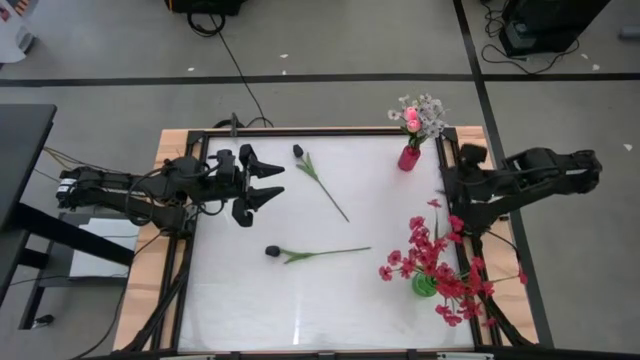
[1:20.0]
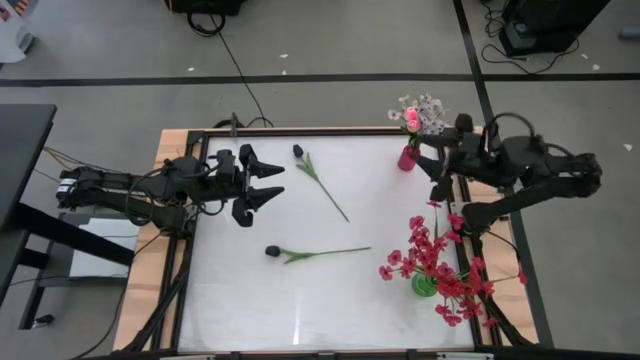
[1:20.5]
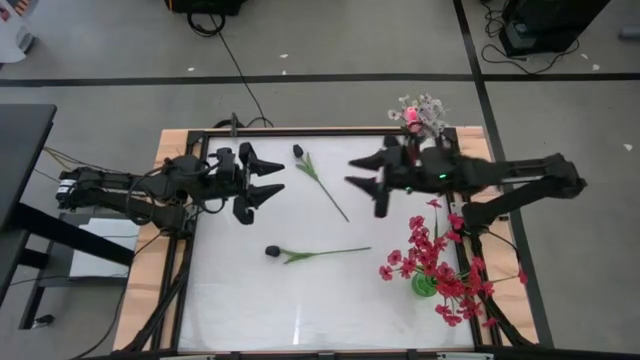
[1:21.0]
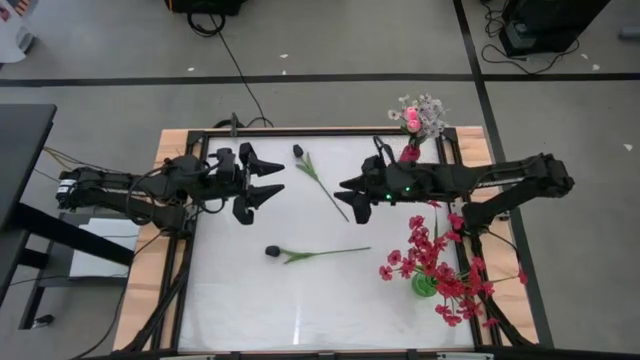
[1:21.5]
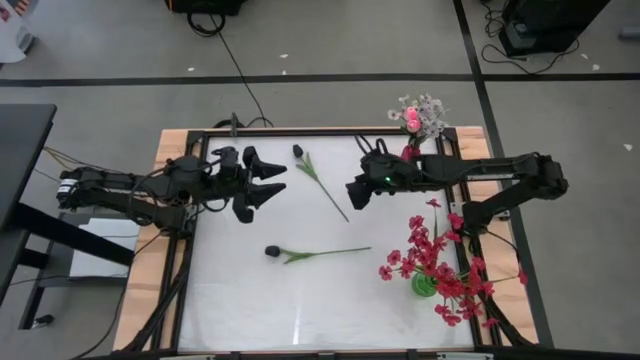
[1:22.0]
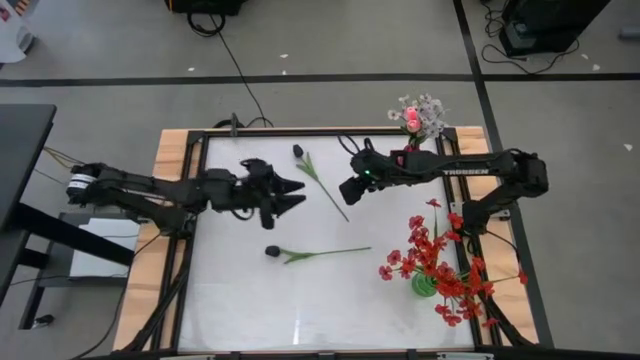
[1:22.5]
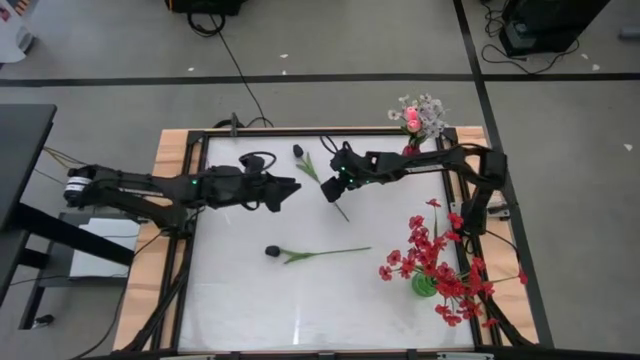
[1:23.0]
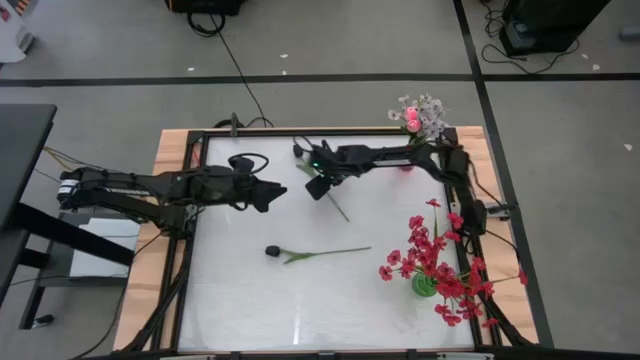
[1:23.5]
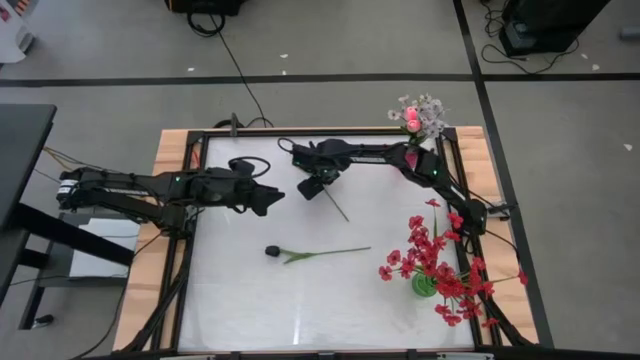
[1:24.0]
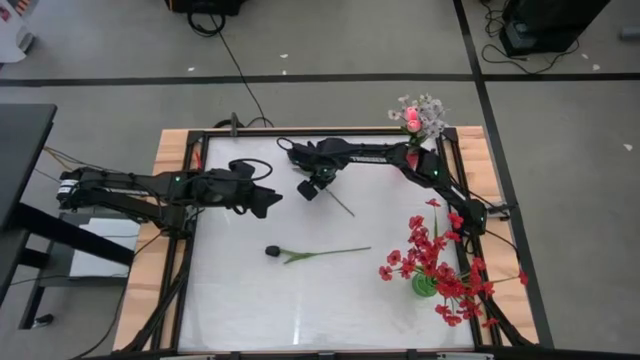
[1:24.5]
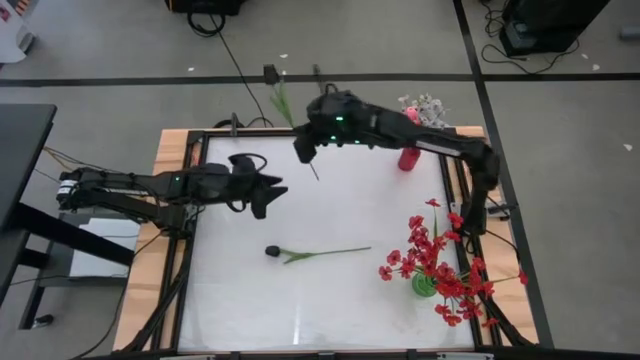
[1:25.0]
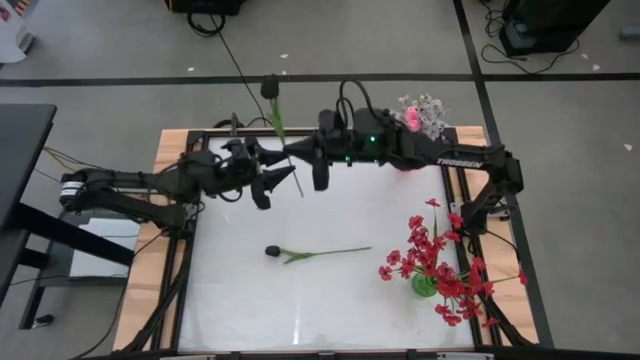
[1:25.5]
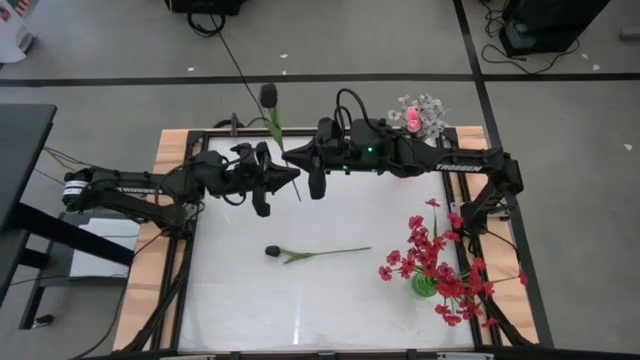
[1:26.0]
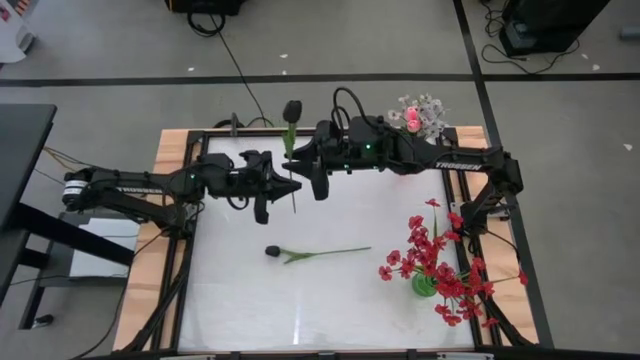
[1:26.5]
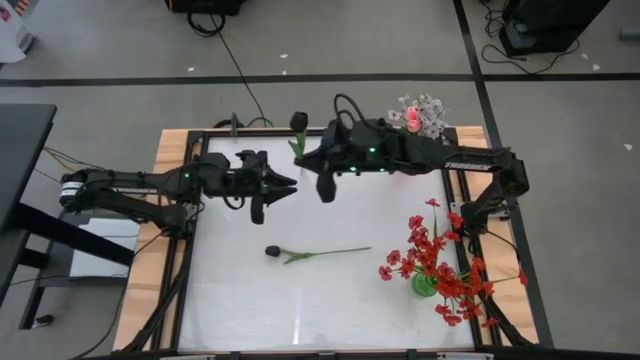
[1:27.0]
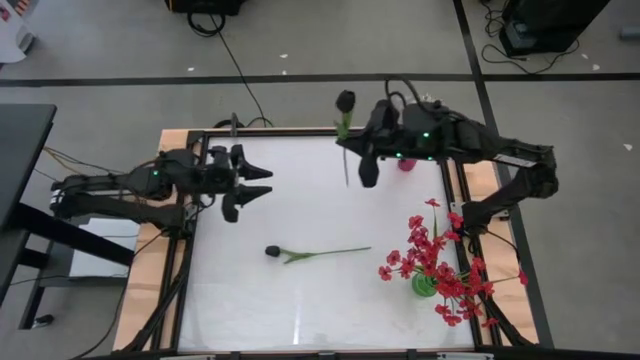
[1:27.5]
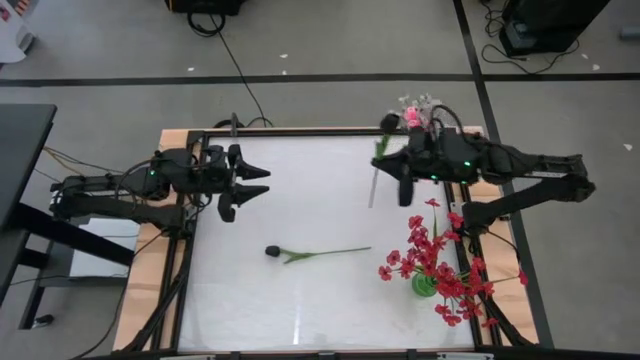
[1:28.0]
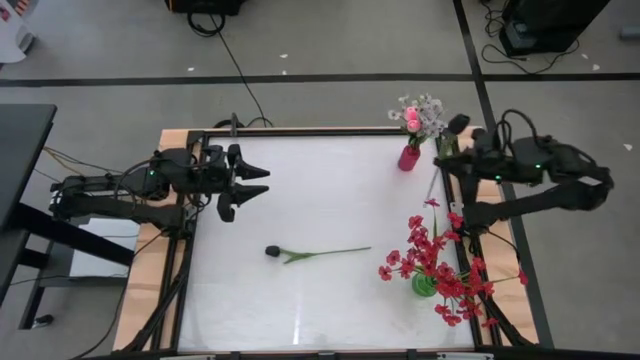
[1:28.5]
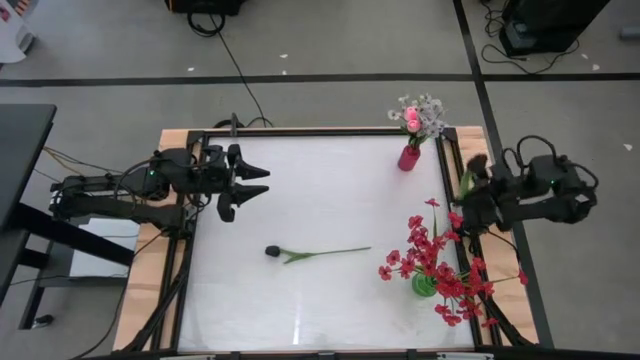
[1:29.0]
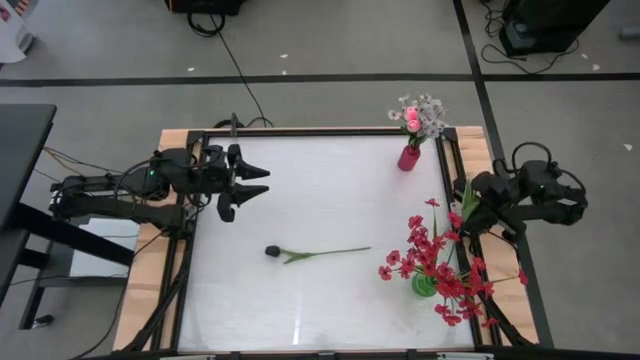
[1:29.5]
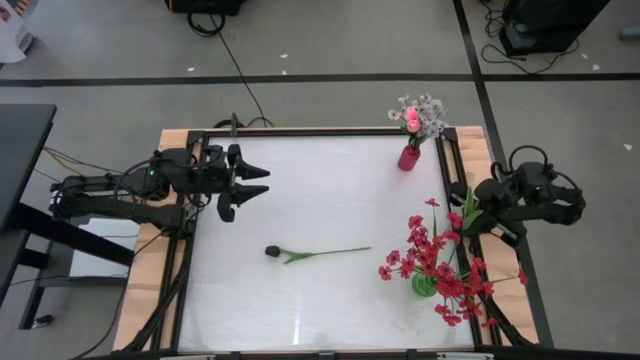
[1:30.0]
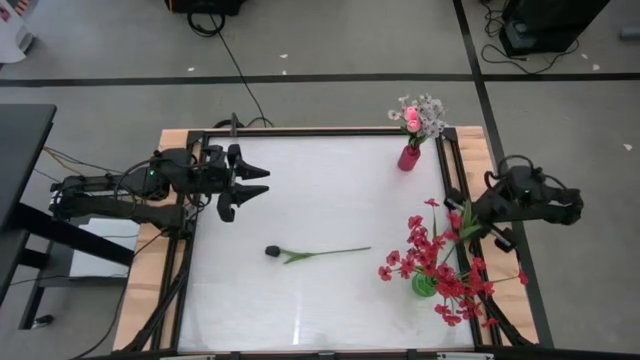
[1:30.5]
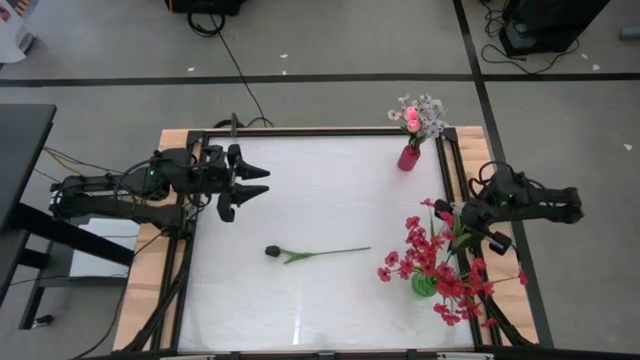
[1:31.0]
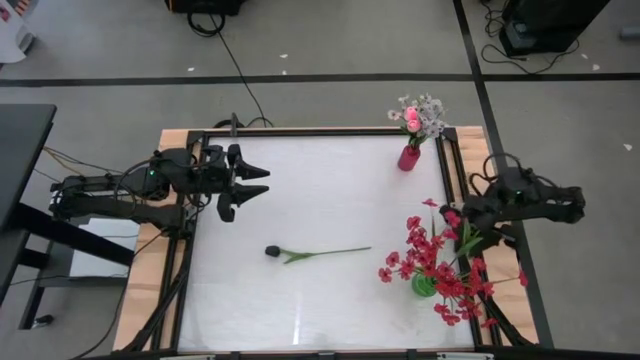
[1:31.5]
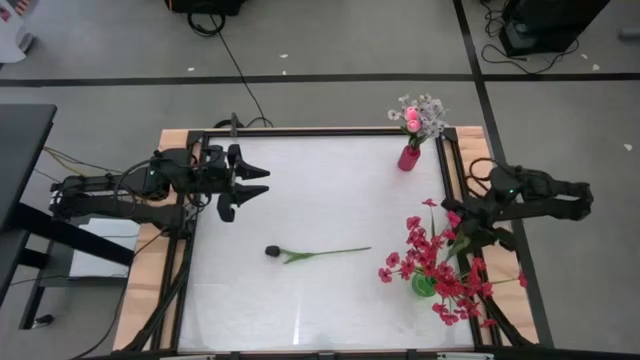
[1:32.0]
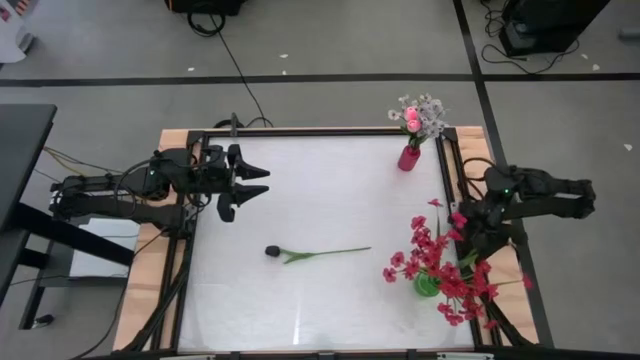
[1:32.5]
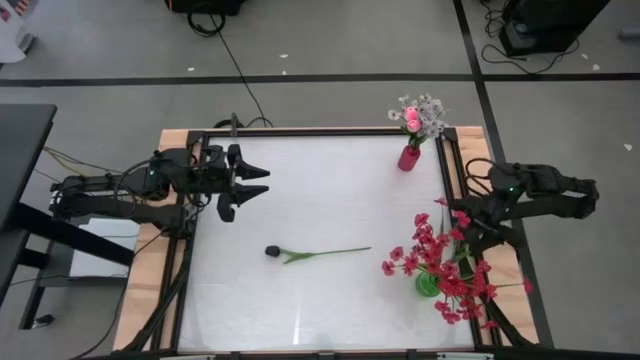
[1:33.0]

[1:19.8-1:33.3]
Task: Sort flowers into vase by color
Put the top black flower into the green vase

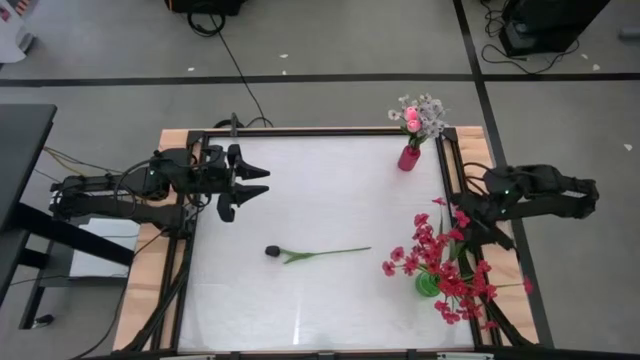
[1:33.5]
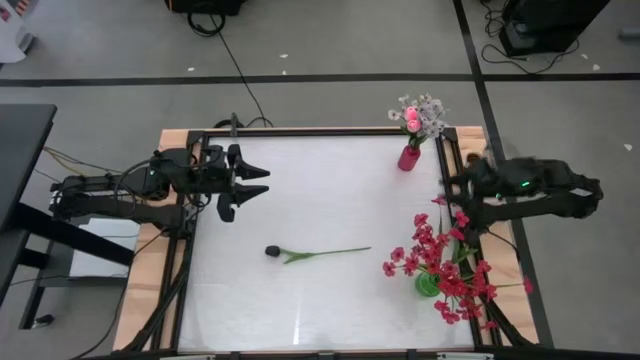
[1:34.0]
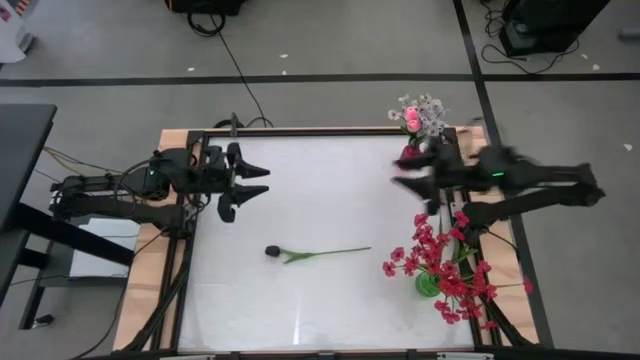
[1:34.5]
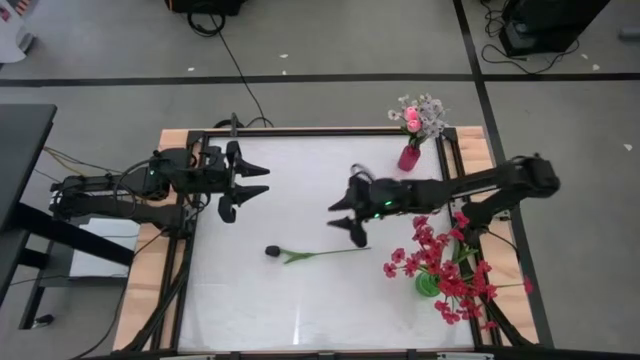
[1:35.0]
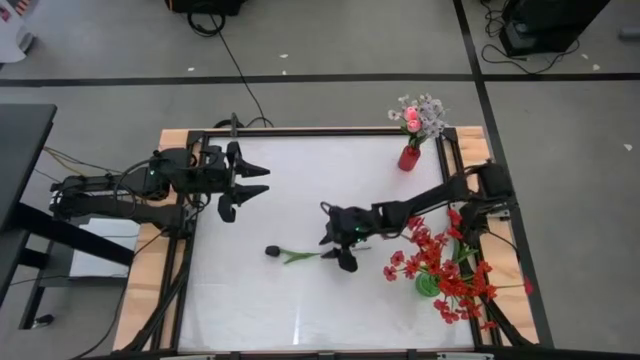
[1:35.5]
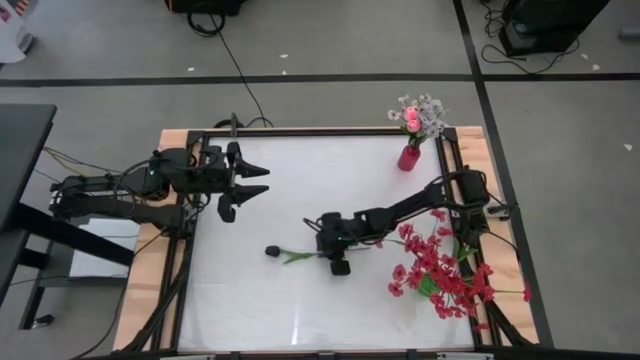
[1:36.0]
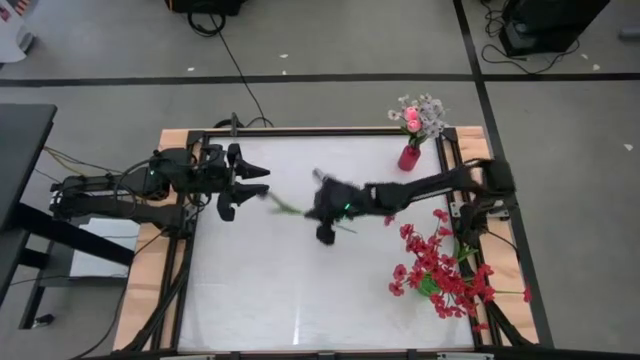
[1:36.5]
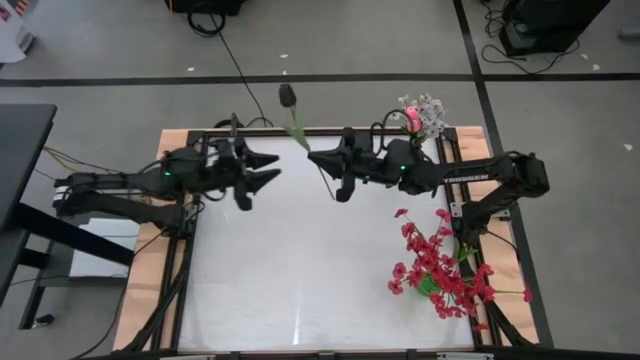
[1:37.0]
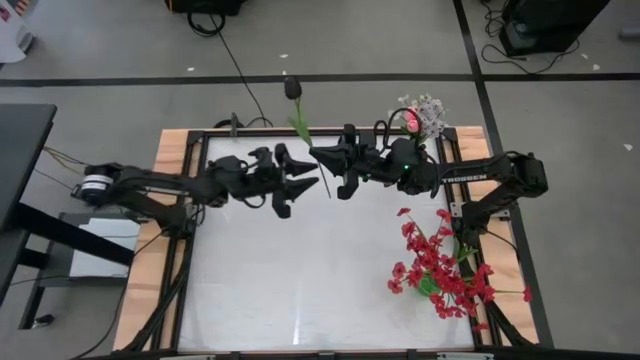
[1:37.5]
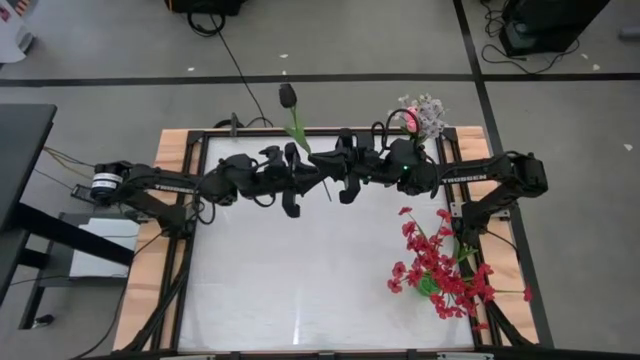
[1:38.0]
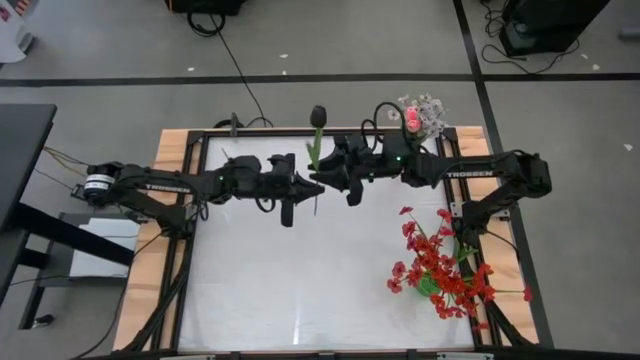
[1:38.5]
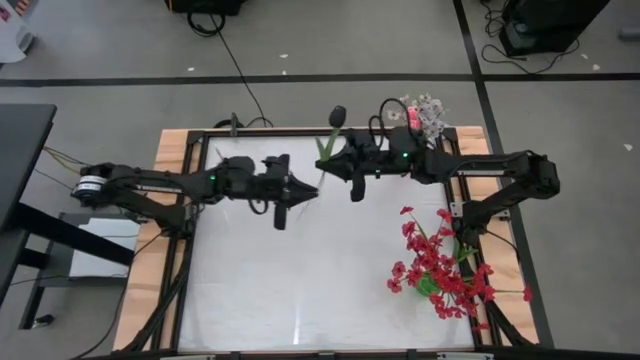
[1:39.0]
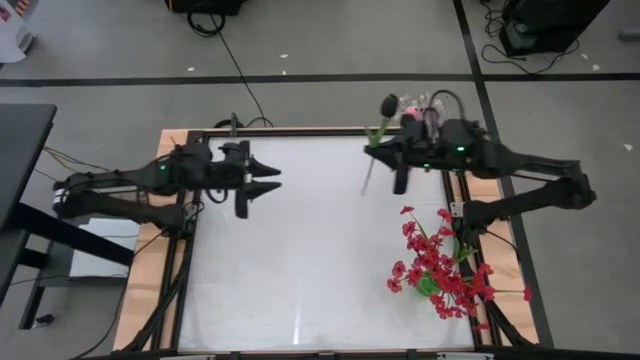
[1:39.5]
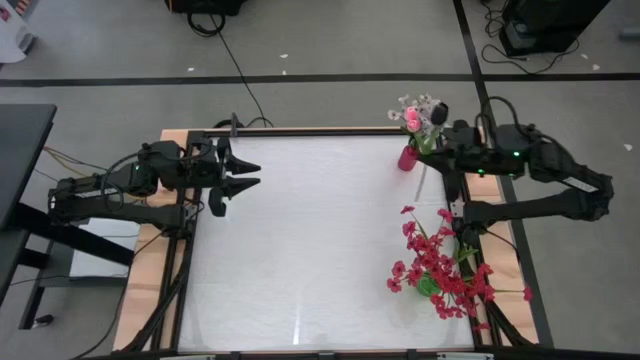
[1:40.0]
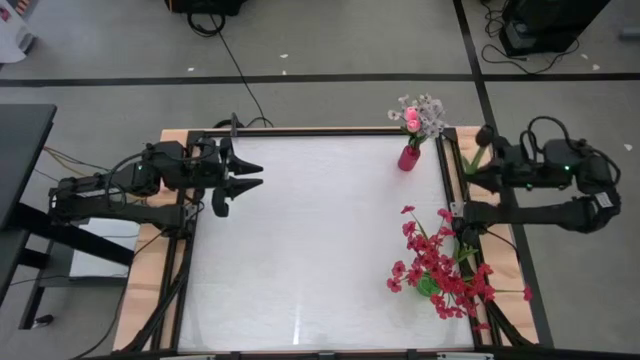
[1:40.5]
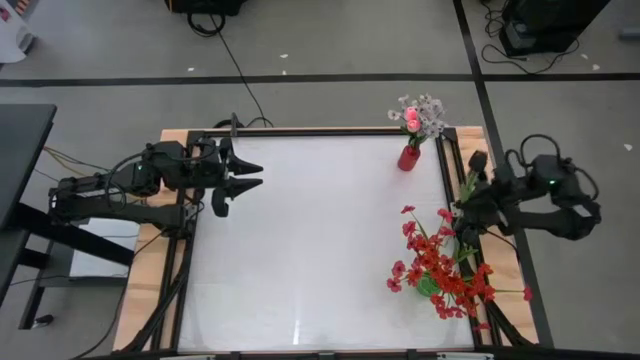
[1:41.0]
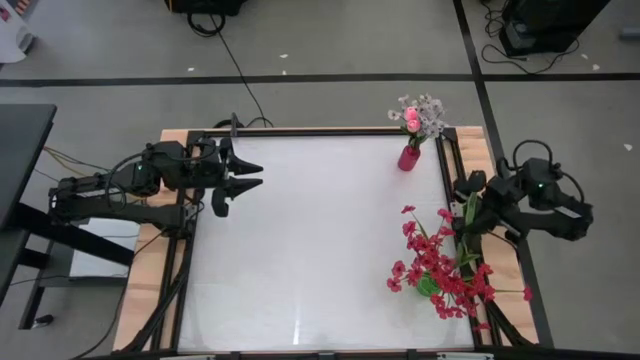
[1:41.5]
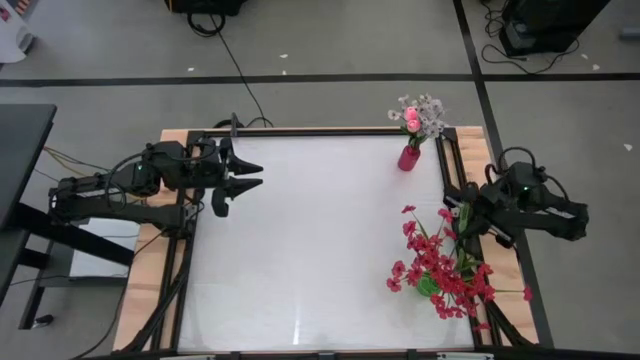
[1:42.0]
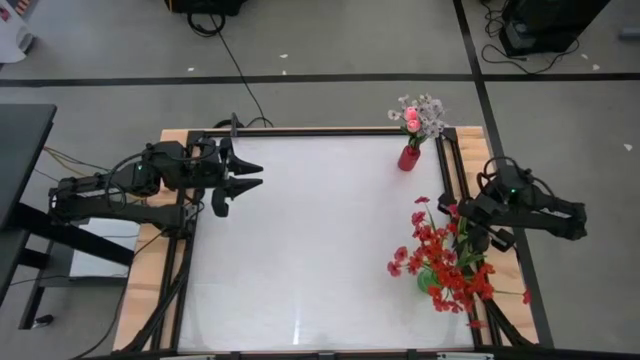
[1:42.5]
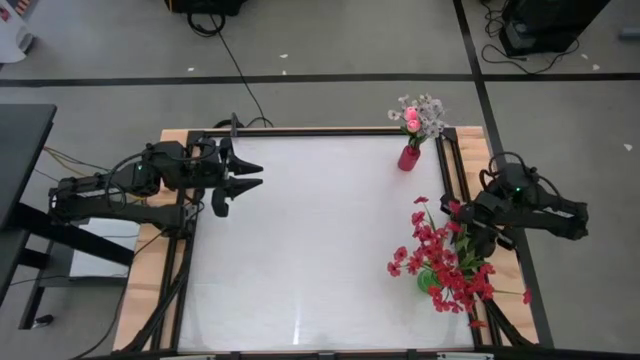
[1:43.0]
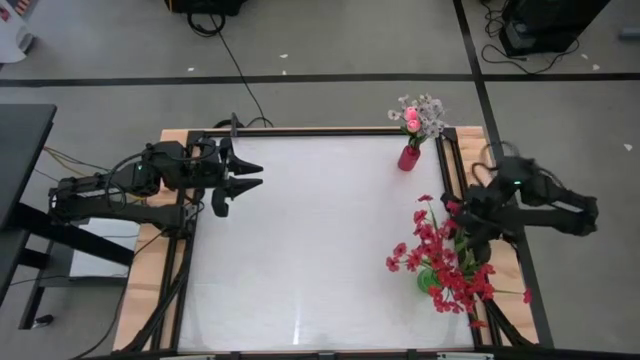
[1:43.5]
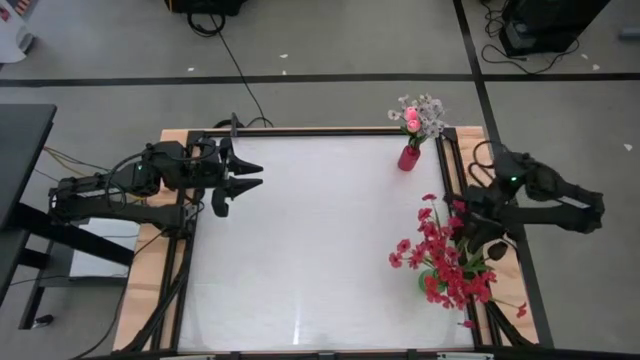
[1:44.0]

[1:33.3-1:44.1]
Put the black flower into the green vase
